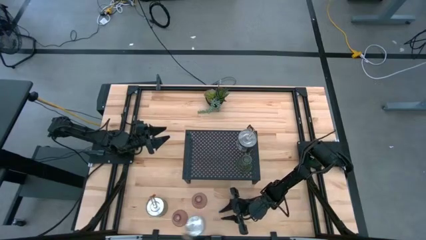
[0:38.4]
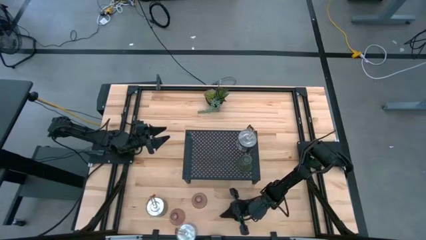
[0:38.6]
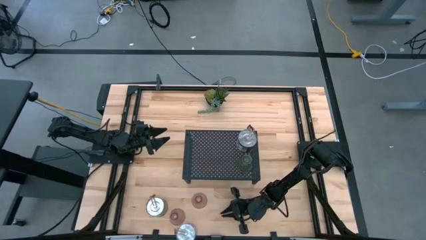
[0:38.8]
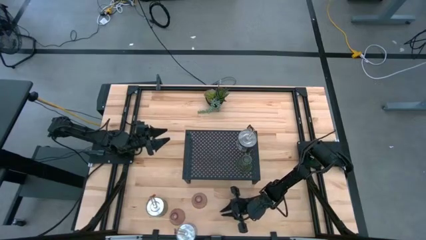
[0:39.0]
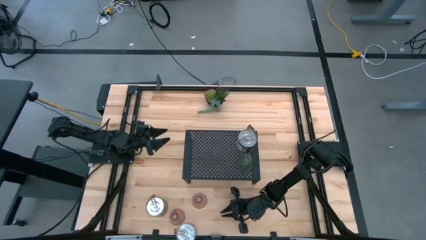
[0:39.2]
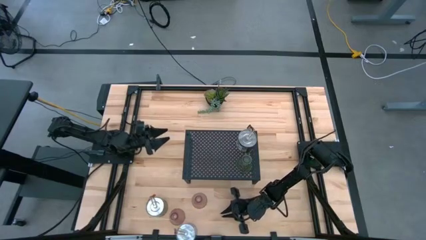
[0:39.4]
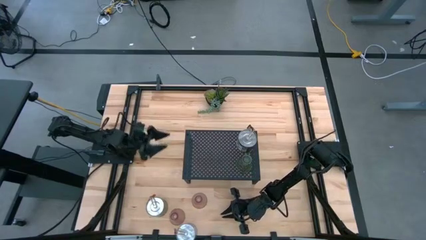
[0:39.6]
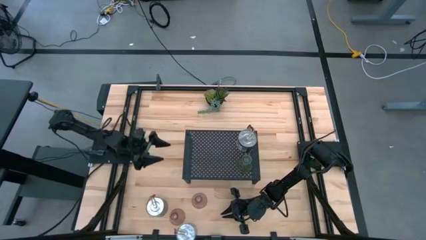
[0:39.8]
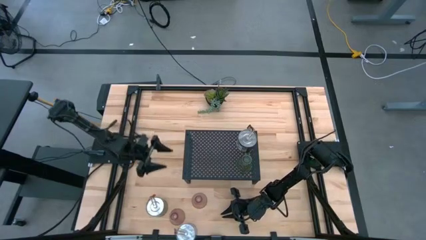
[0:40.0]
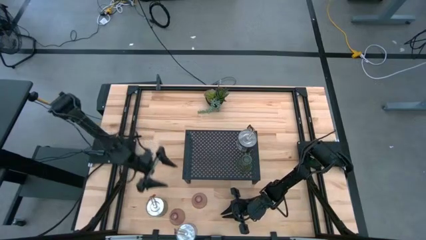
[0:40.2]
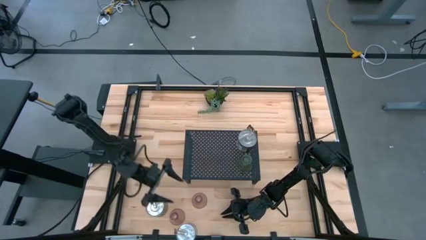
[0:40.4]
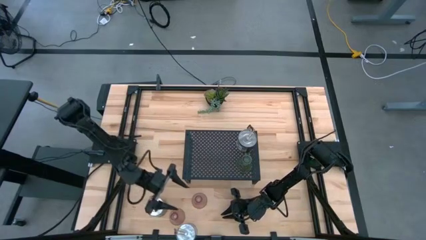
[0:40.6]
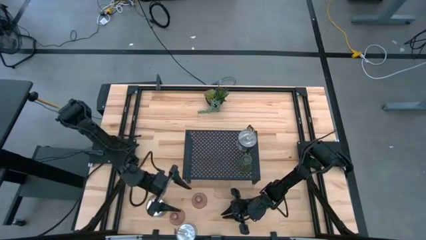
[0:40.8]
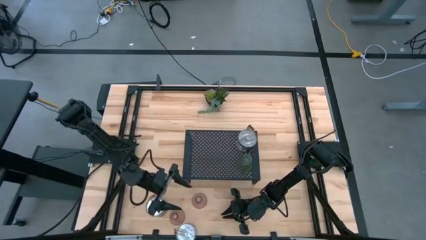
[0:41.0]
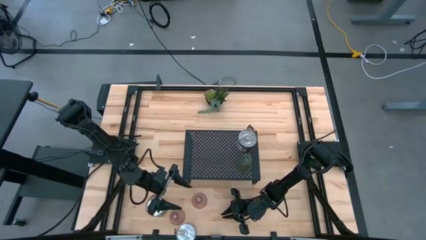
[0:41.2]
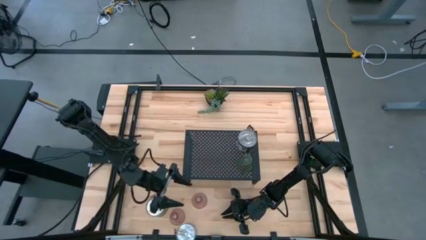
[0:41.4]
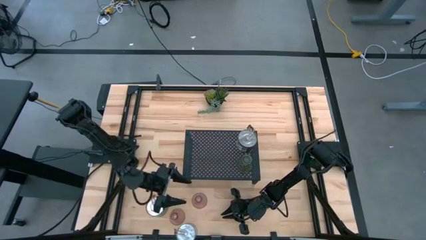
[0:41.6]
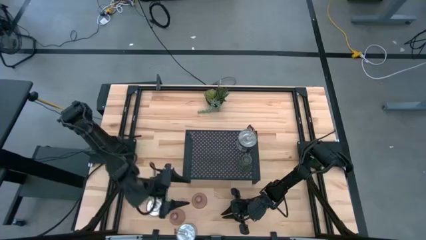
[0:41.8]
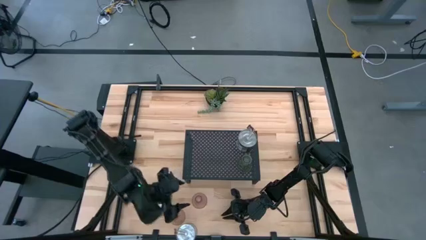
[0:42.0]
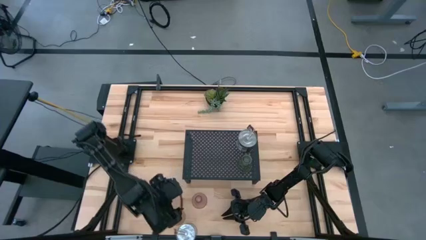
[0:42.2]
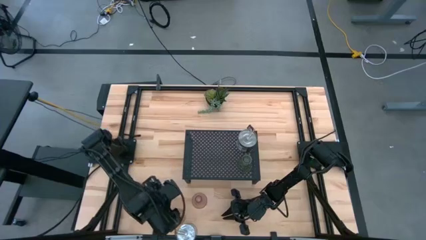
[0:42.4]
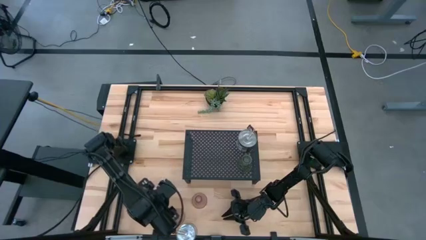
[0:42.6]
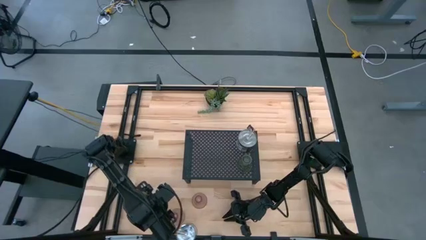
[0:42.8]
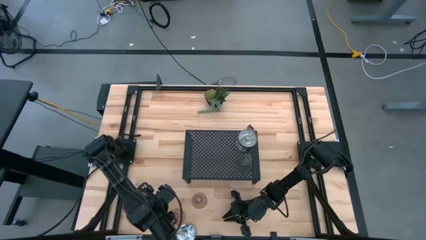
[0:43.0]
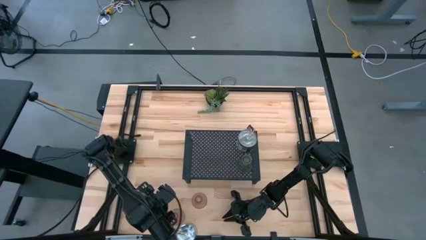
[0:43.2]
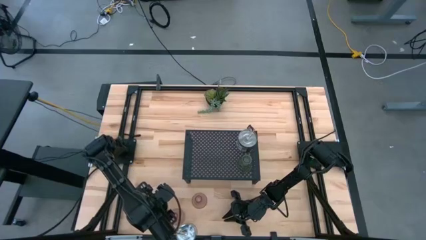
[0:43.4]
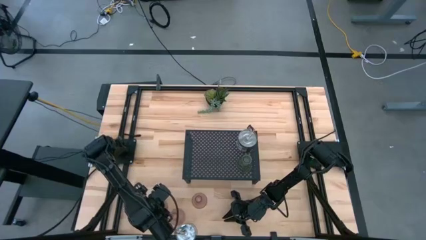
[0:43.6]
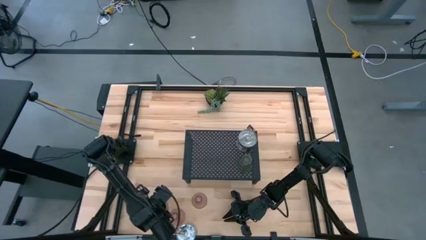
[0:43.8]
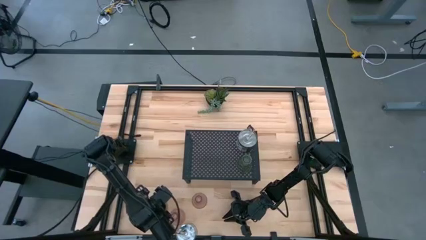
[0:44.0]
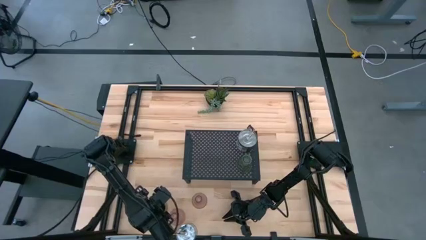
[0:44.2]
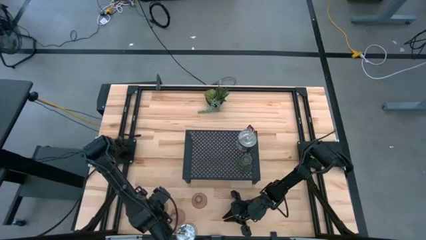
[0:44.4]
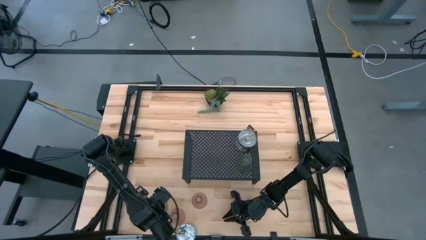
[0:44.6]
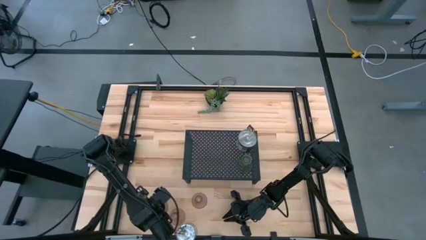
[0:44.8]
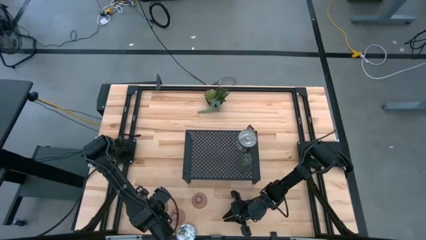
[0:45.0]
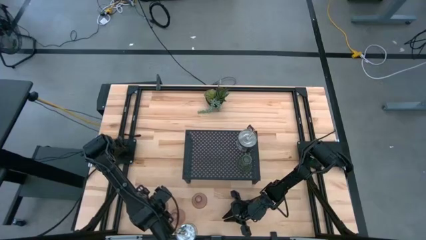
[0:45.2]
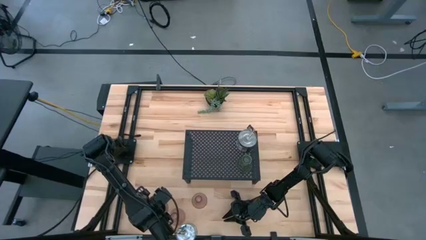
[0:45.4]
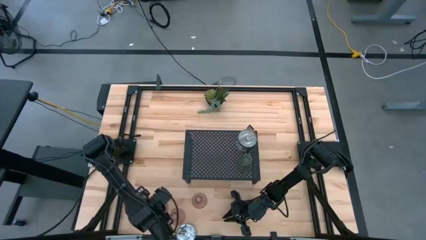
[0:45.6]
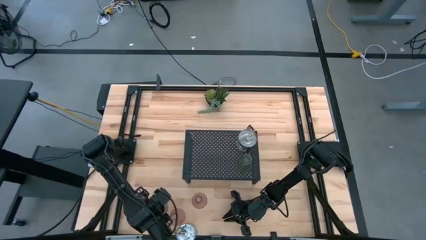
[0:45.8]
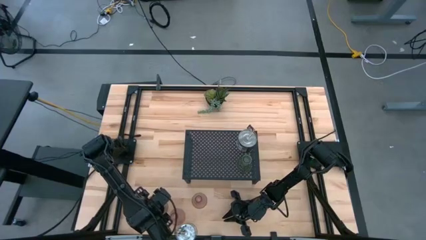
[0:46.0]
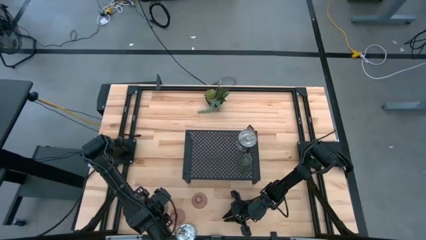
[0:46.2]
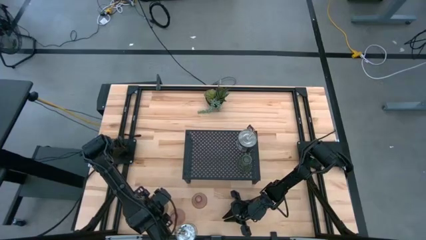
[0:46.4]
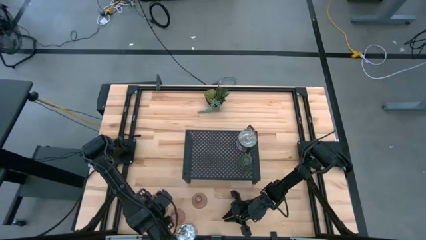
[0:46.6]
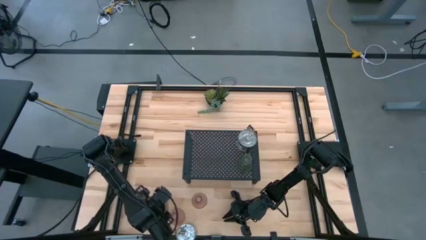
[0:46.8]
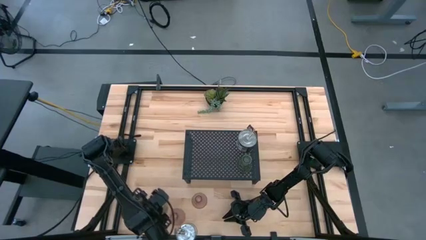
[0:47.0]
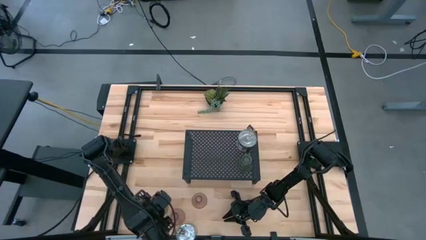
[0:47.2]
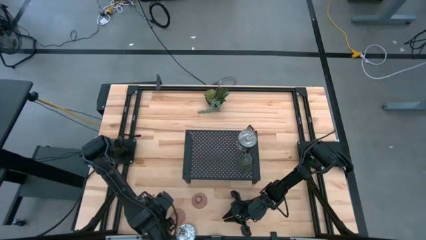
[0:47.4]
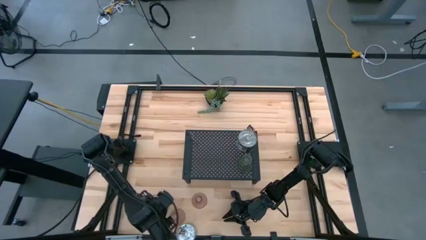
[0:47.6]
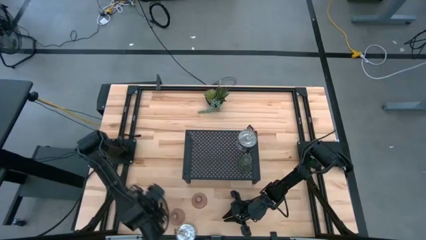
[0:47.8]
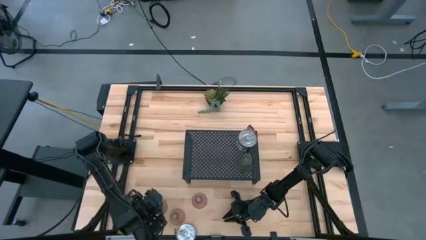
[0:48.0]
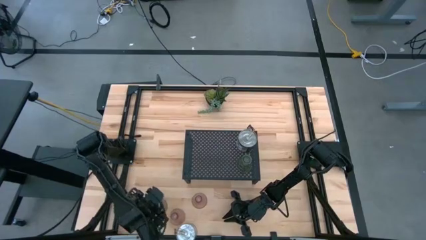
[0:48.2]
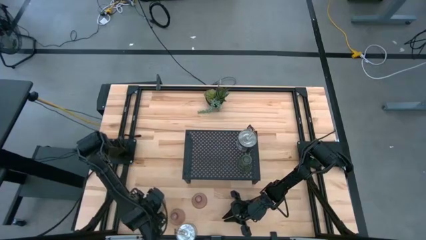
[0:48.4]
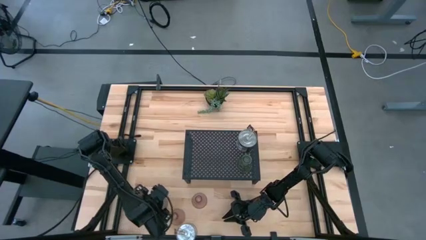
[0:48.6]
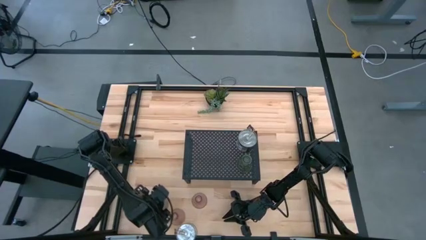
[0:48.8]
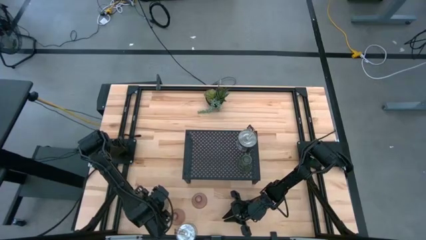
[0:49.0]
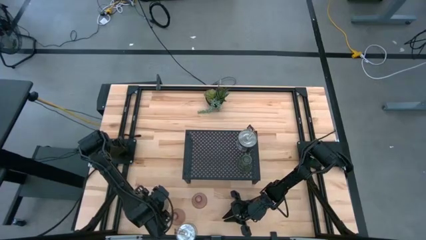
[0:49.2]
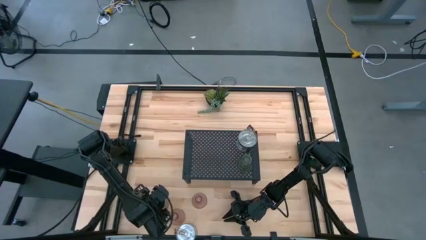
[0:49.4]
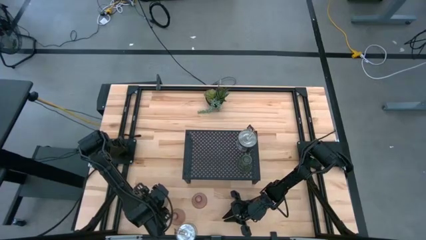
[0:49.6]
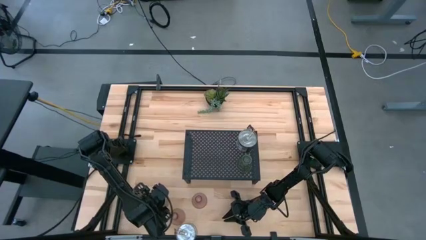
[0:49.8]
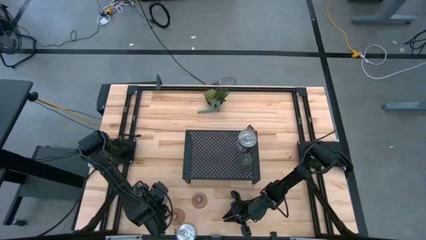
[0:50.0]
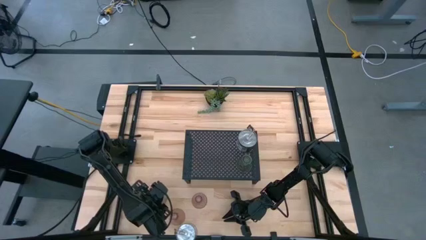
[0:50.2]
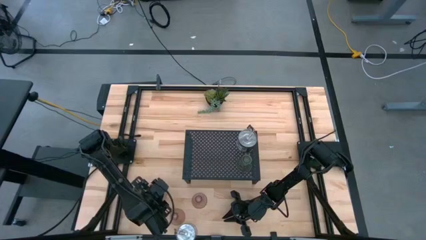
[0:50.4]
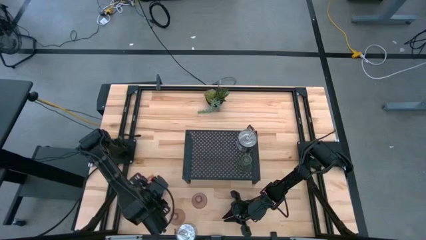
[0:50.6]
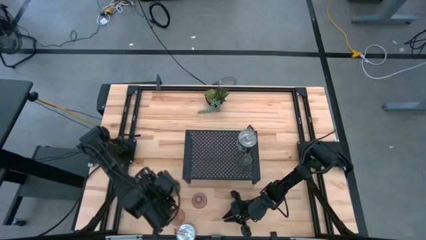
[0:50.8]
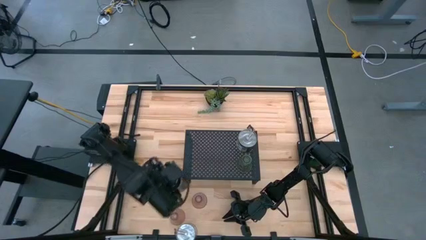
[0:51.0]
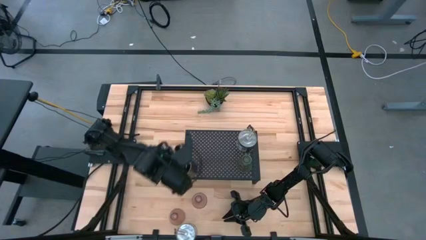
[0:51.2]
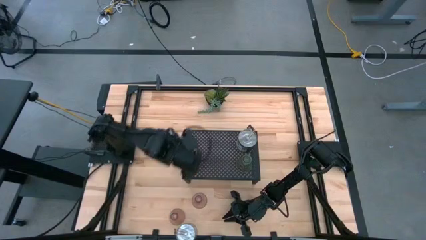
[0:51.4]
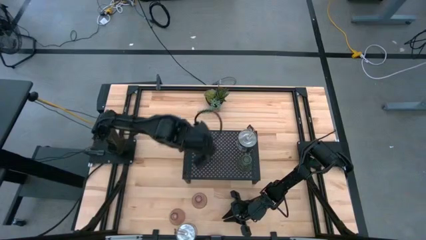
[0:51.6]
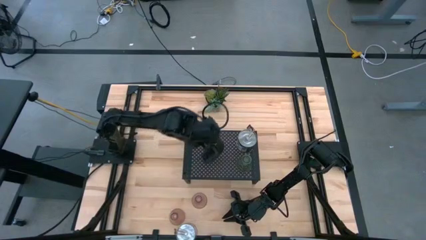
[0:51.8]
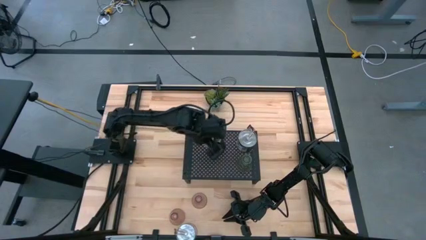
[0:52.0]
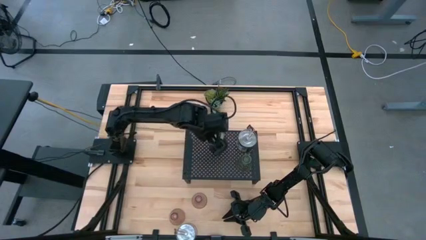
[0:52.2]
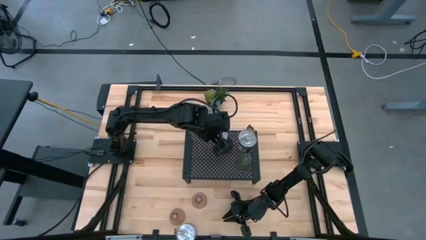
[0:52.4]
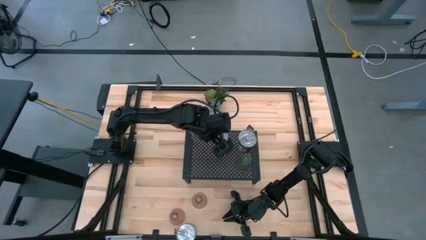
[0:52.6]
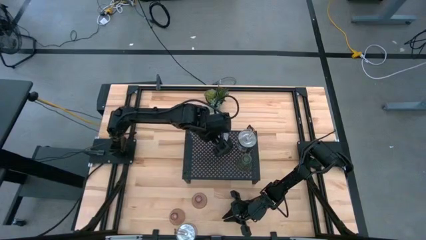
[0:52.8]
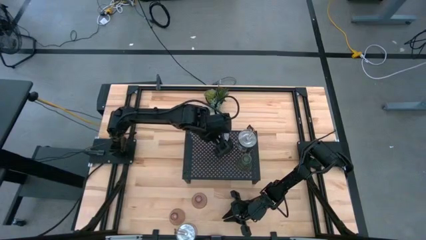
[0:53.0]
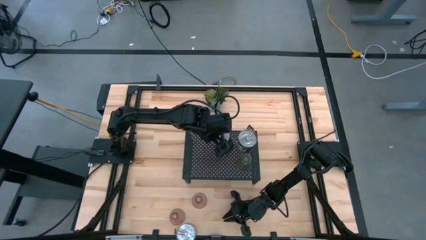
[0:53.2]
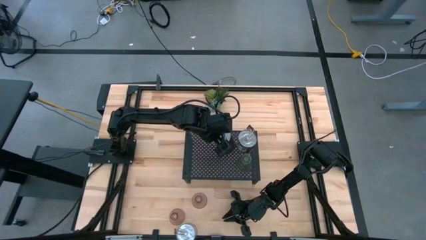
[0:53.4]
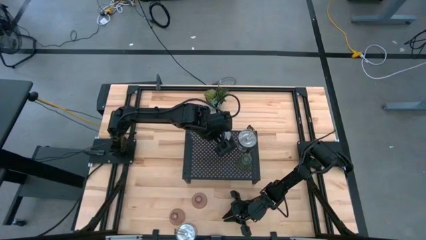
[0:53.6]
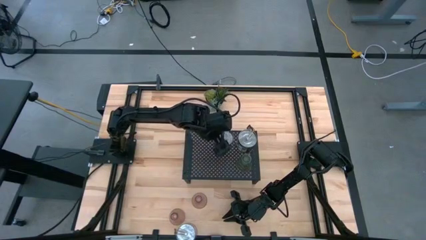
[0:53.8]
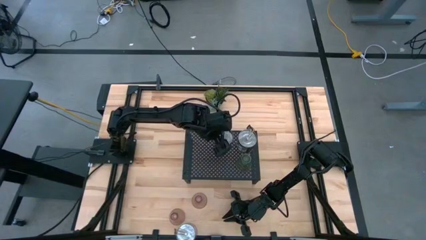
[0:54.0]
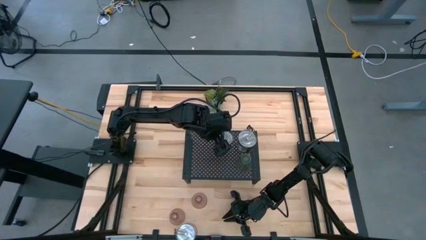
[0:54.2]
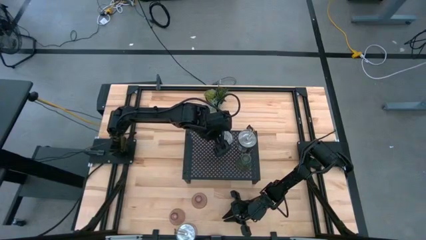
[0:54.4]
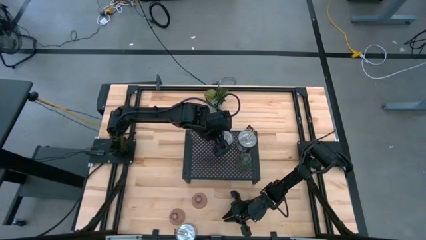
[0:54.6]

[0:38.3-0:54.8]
Task: Pick & Place candle stick holders
Put the left silver scented candle on the black shelf aligned with the other silver scented candle
